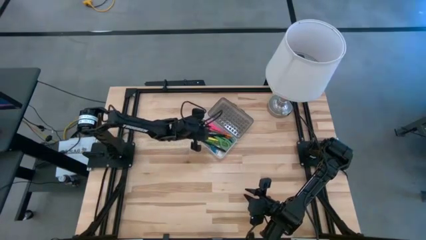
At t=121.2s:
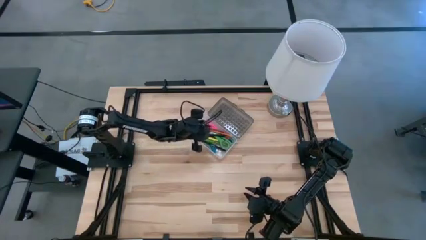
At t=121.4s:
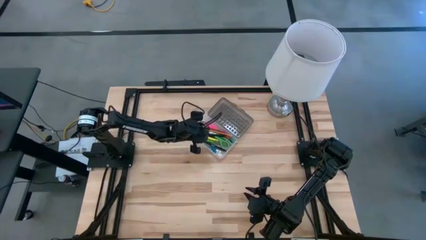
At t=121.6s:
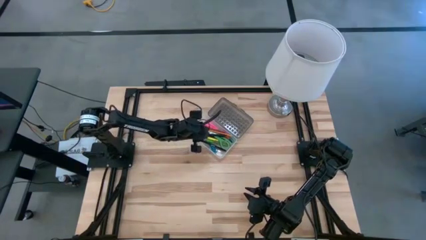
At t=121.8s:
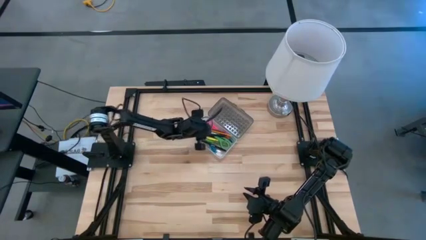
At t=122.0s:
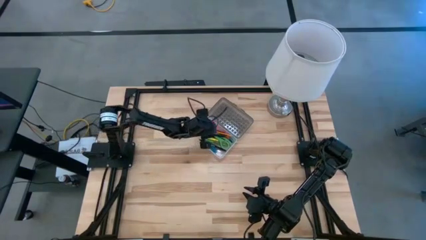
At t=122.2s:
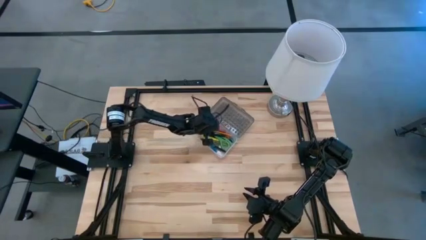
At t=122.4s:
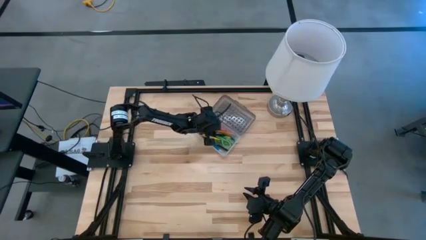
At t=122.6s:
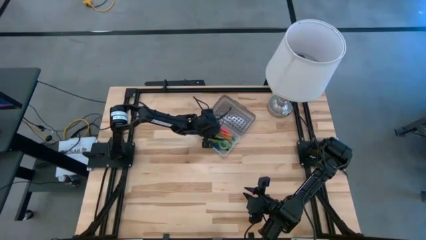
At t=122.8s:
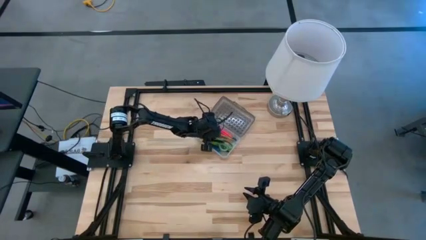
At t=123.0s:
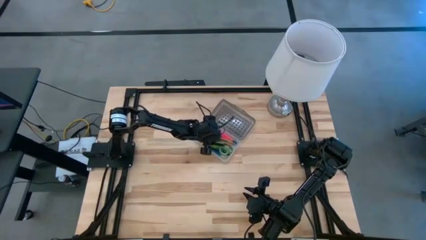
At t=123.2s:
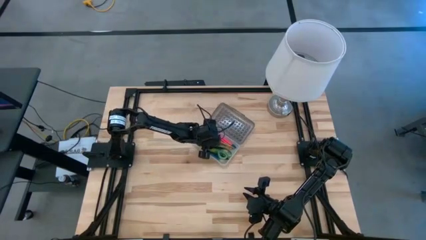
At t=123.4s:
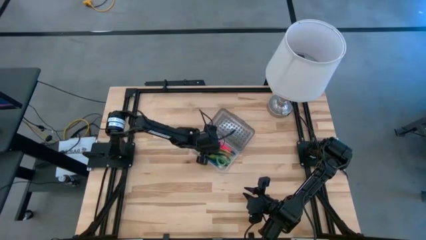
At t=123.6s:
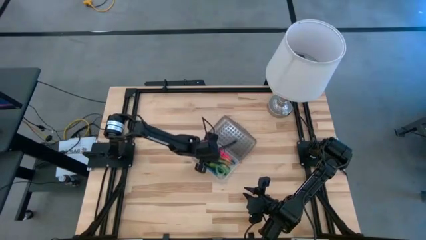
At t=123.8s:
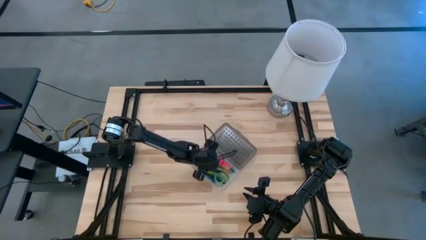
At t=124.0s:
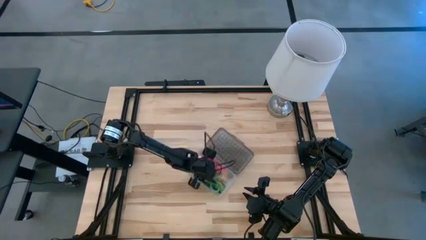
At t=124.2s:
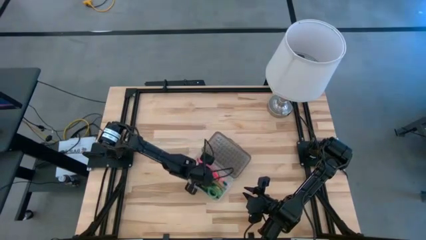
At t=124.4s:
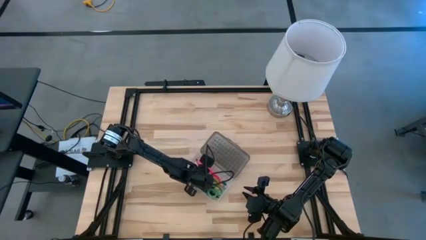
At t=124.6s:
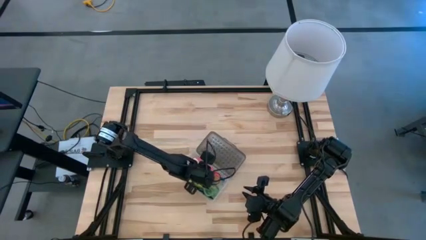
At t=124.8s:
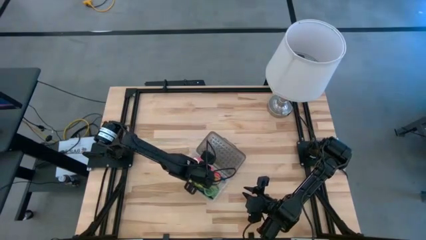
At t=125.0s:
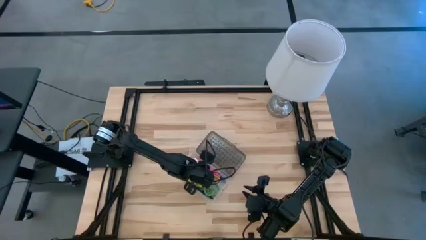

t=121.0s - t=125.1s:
Task: Pick & place school supplies into a supply box
Move the black supply box from the top of the table to the bottom of the table

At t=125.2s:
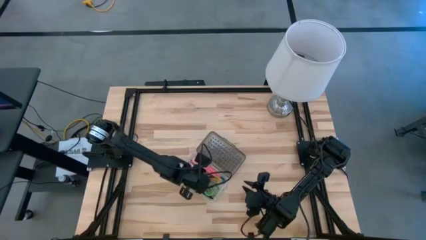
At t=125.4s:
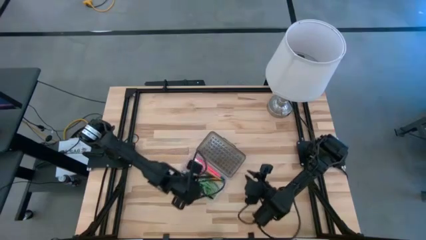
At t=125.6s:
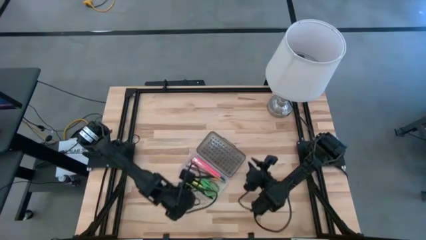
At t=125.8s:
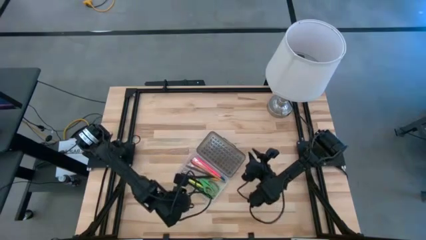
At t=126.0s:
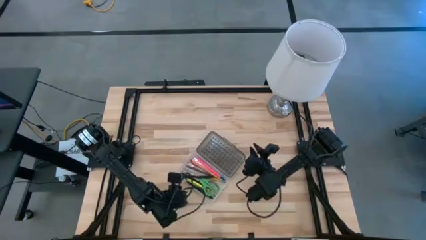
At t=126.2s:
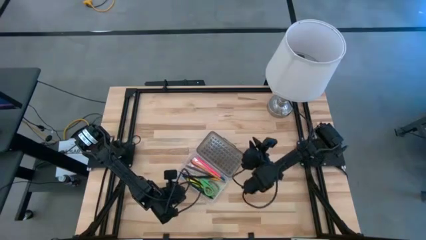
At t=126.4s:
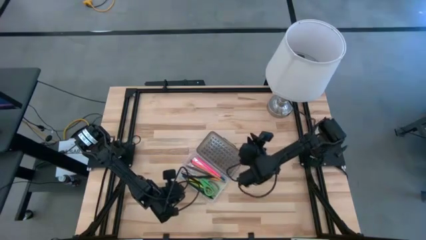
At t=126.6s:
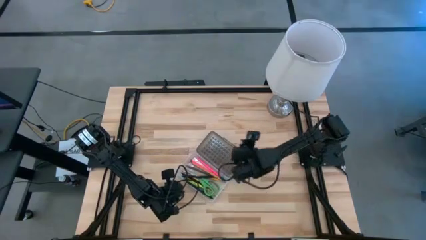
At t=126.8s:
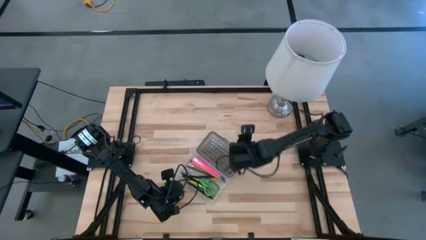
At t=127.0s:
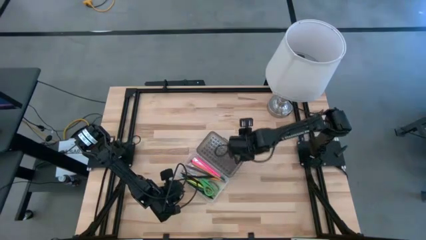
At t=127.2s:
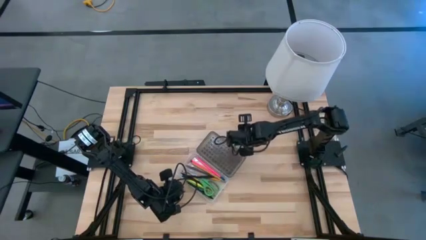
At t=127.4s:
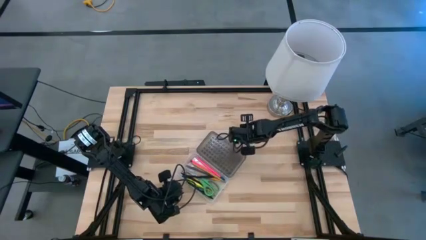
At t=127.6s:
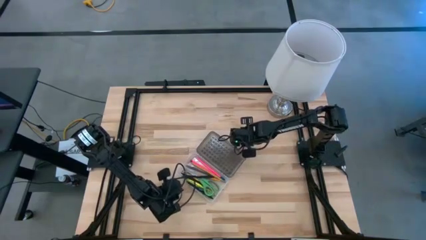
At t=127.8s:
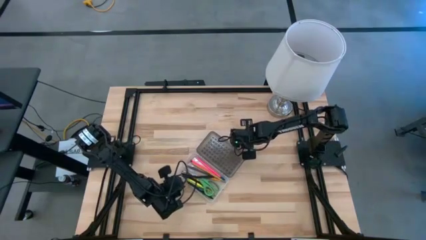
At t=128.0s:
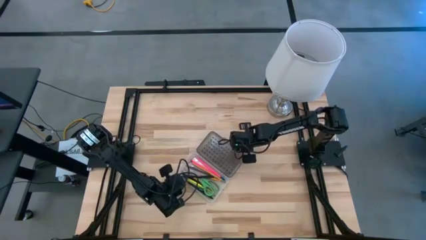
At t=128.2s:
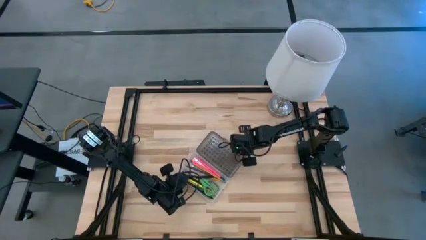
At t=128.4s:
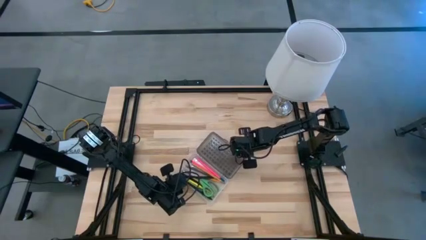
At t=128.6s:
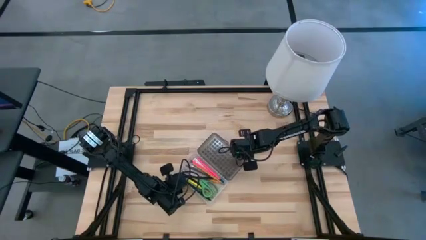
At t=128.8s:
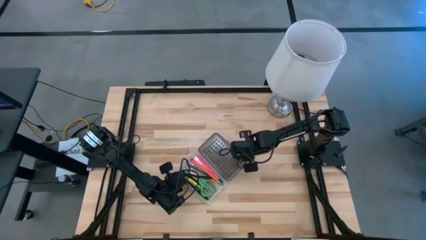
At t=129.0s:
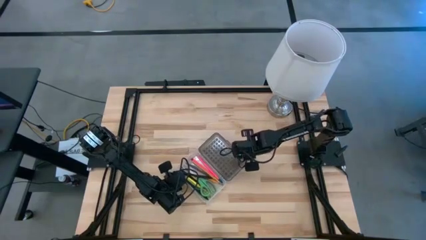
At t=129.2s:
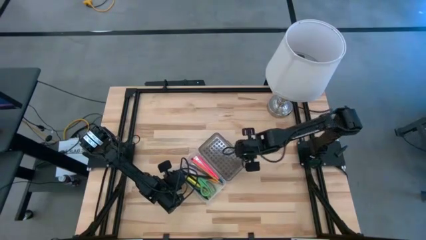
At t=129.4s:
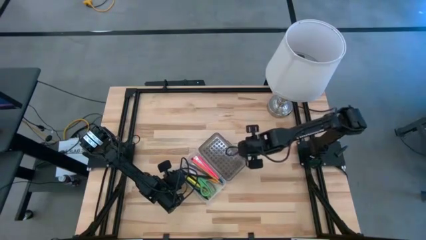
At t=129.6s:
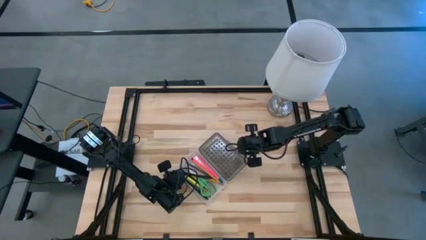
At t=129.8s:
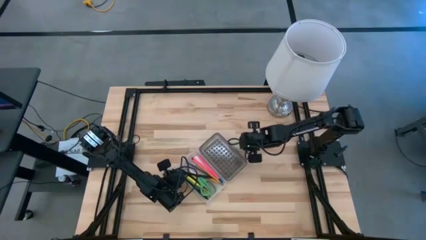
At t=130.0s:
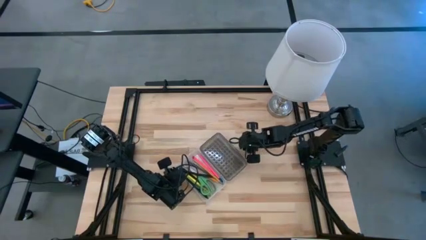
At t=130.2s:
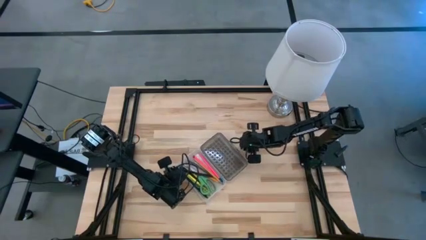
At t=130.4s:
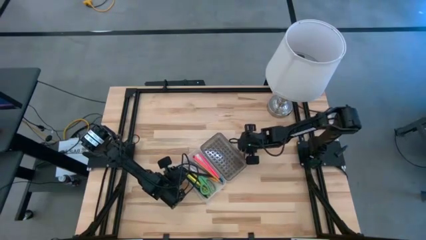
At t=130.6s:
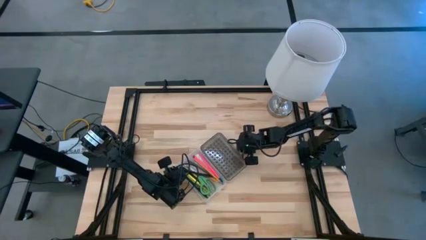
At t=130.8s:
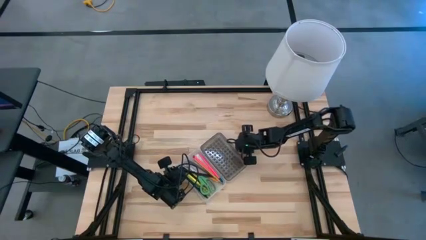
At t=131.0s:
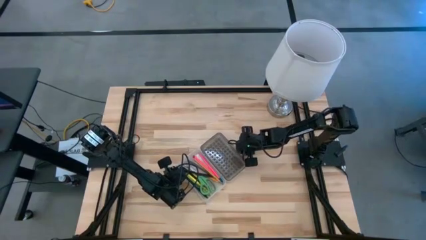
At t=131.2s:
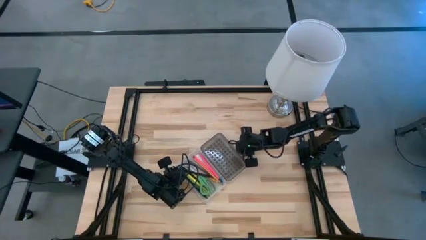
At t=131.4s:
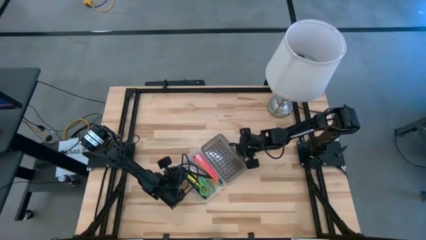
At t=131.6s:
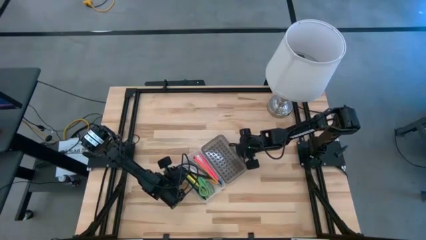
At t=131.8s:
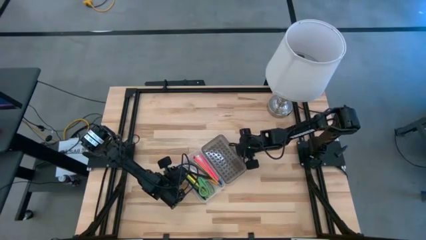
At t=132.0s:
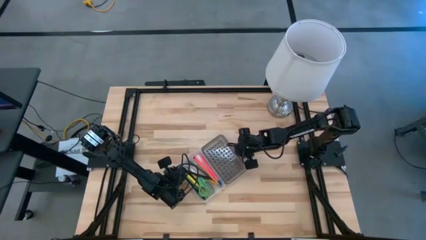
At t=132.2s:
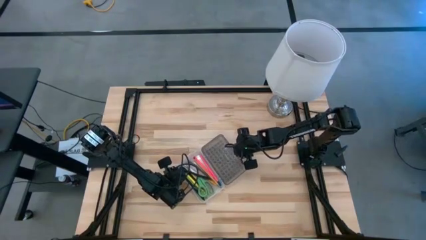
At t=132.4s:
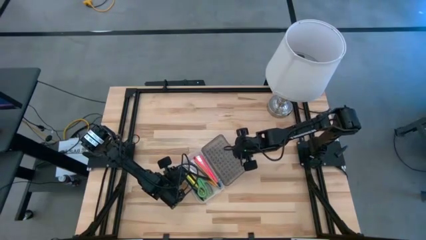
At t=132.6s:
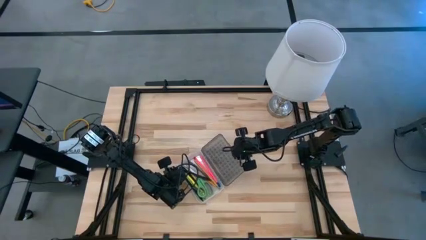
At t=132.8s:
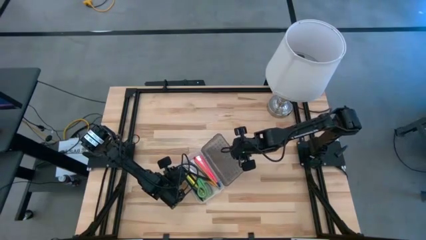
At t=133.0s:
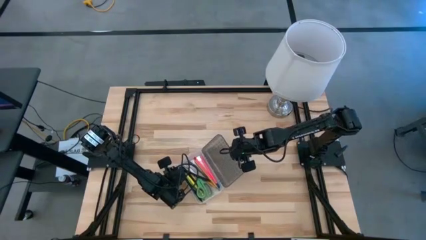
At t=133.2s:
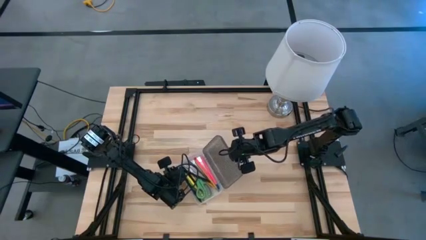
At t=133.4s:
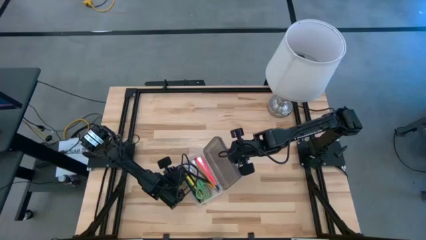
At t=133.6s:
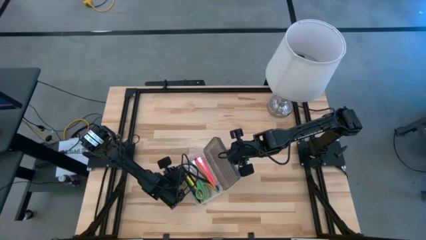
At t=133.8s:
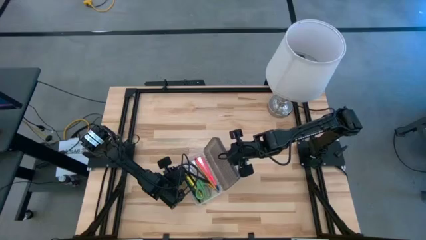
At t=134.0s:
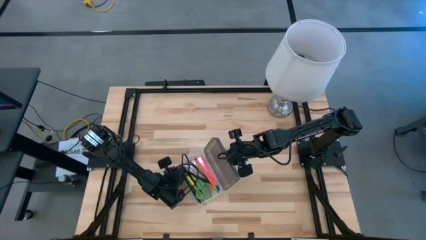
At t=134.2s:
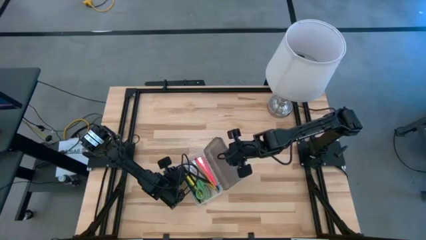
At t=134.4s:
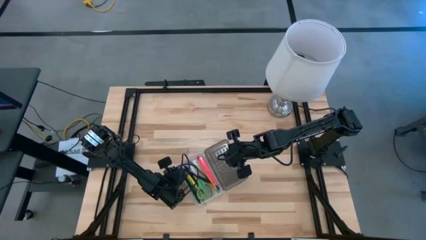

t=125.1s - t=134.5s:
Close the black supply box

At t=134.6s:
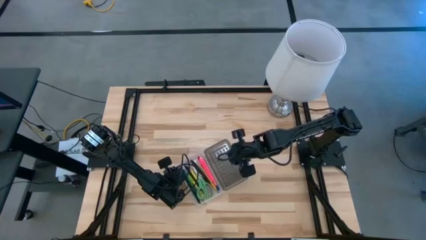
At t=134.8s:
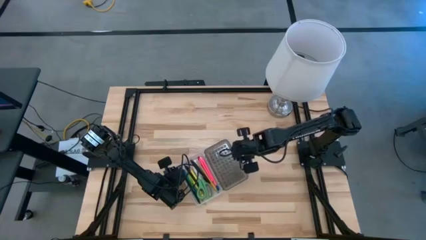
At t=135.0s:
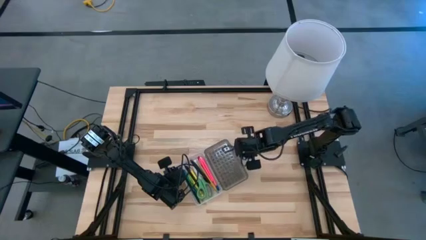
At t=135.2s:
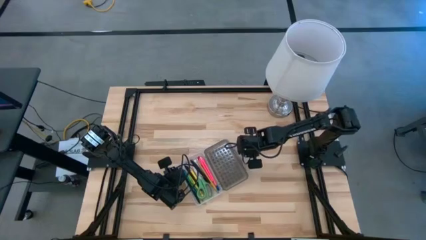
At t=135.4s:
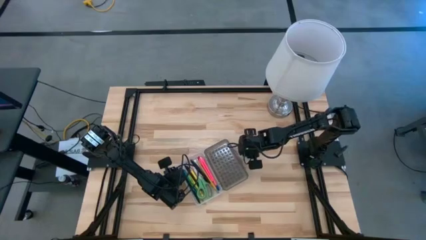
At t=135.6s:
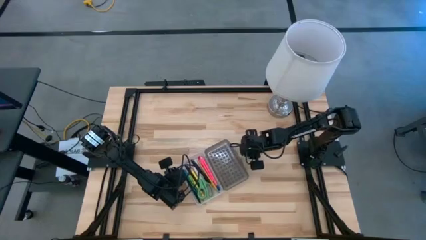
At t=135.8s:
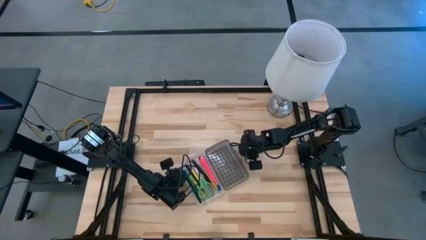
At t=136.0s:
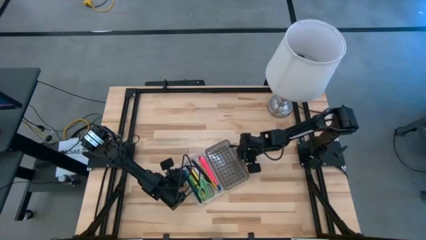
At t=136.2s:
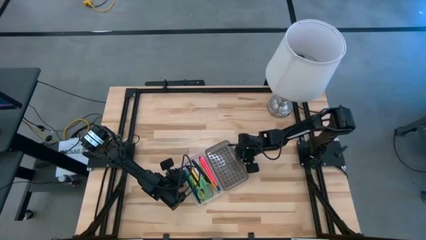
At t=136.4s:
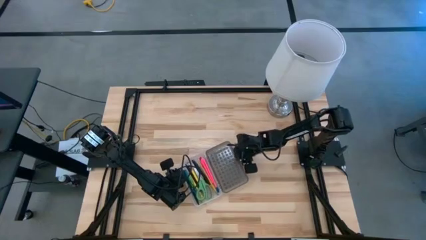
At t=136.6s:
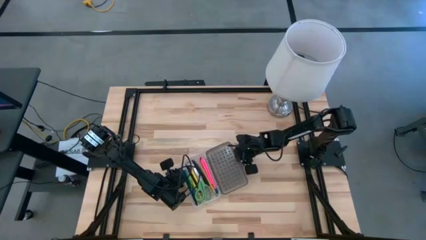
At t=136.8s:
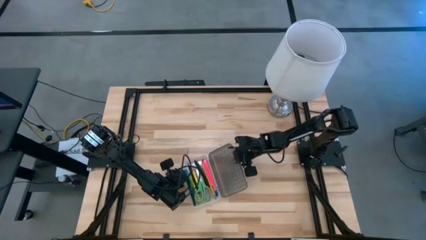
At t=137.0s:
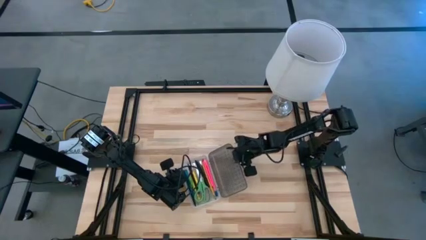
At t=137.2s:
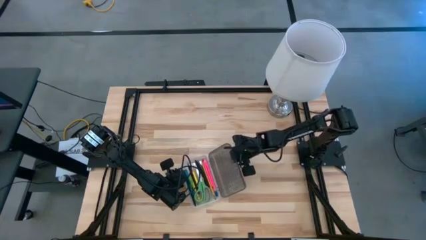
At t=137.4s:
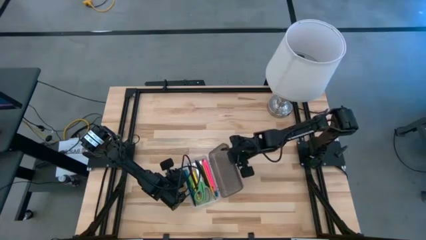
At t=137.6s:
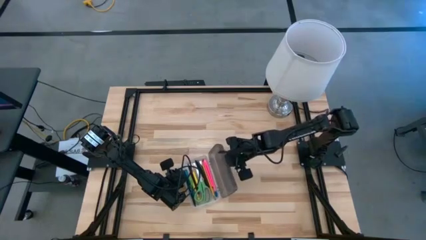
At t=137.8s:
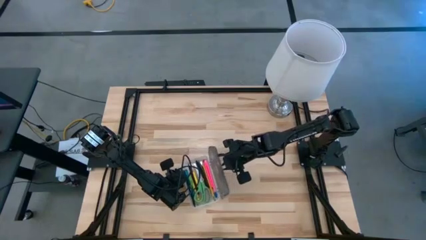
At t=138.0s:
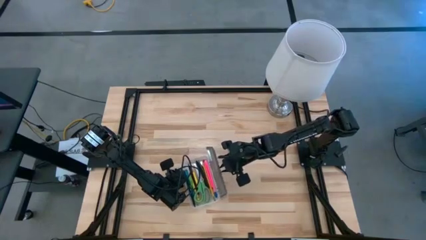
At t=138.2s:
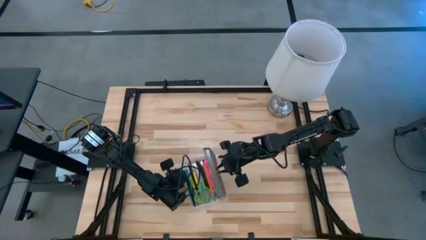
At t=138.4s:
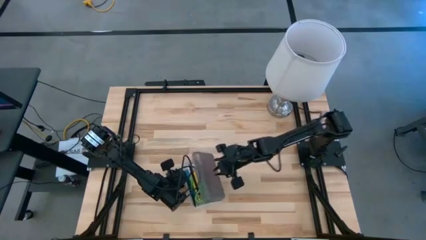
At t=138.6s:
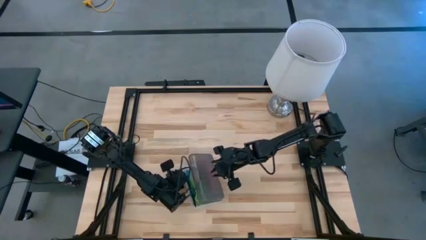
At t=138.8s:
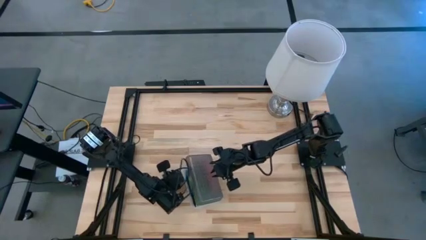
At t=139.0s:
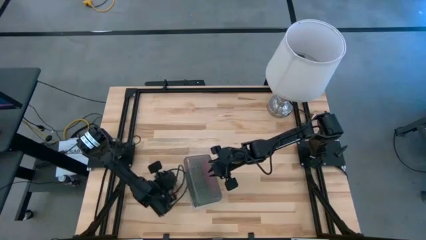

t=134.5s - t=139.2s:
Close the black supply box
